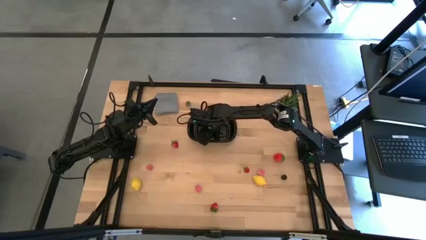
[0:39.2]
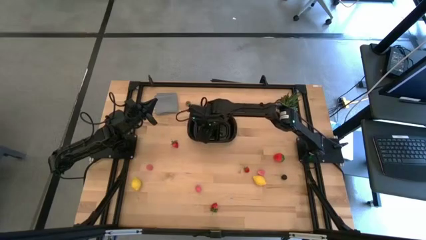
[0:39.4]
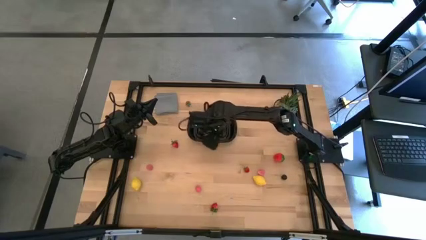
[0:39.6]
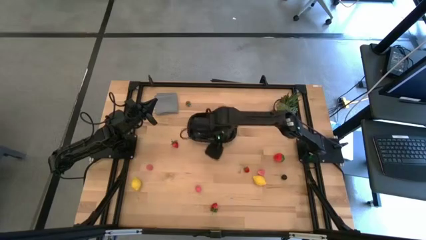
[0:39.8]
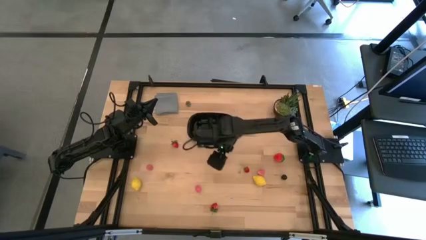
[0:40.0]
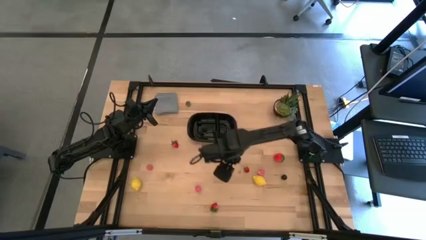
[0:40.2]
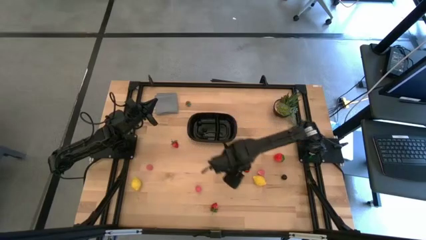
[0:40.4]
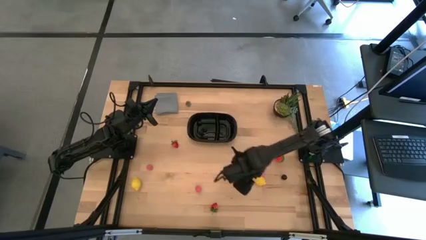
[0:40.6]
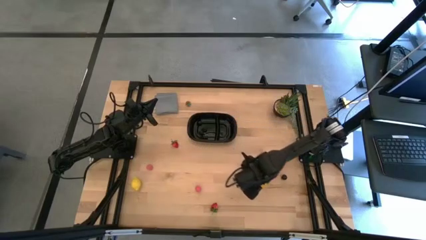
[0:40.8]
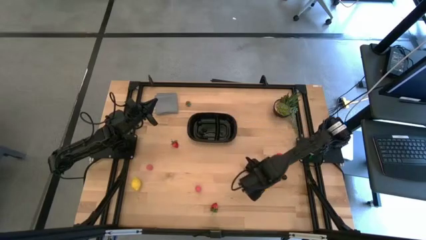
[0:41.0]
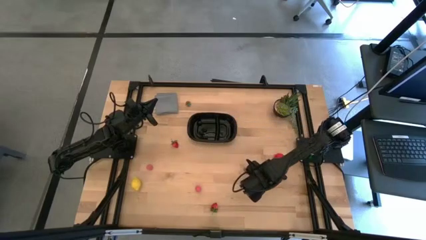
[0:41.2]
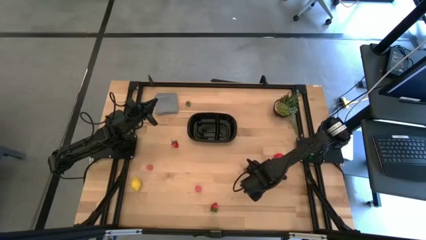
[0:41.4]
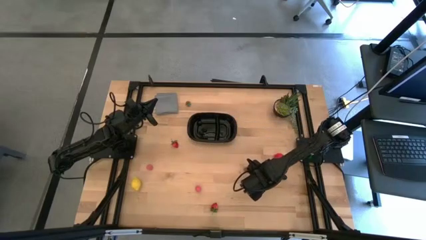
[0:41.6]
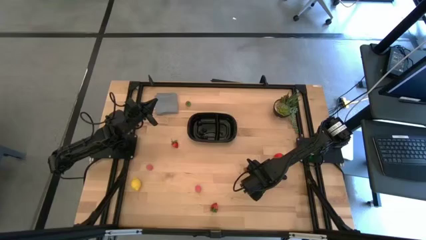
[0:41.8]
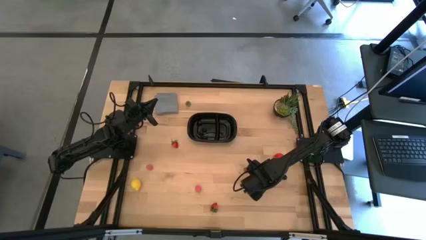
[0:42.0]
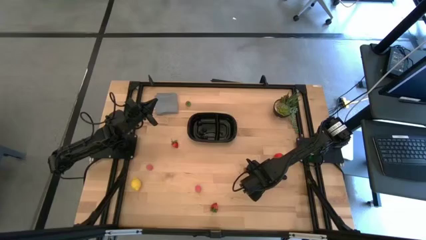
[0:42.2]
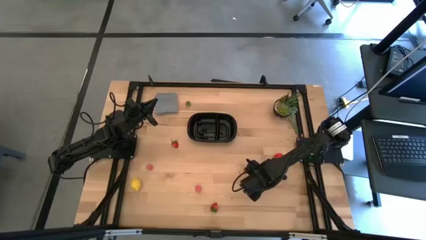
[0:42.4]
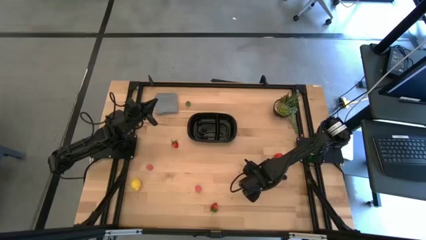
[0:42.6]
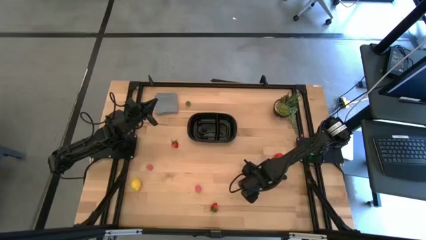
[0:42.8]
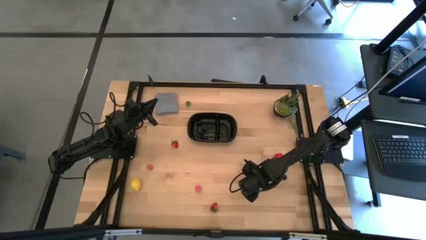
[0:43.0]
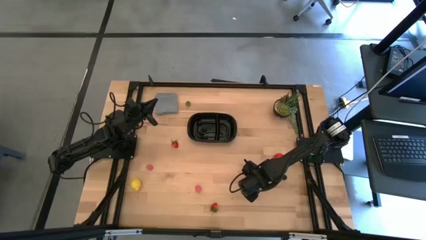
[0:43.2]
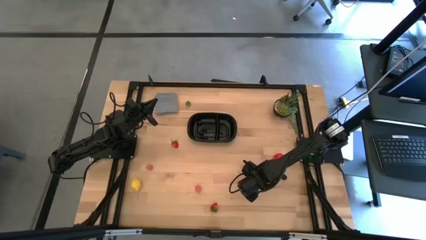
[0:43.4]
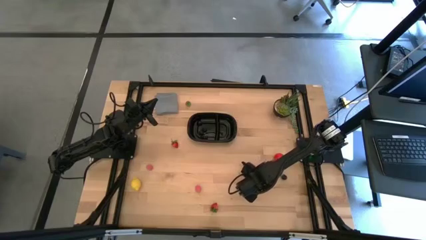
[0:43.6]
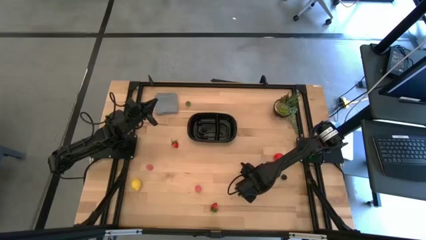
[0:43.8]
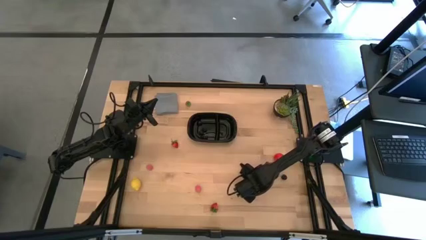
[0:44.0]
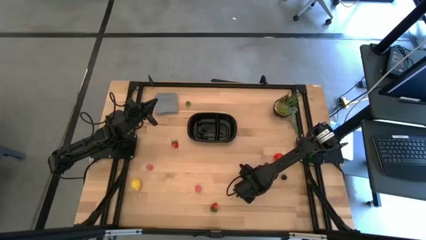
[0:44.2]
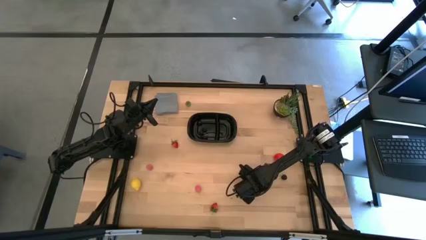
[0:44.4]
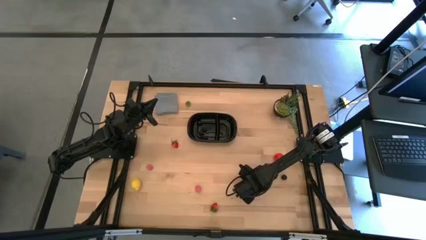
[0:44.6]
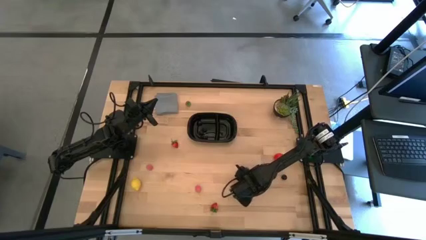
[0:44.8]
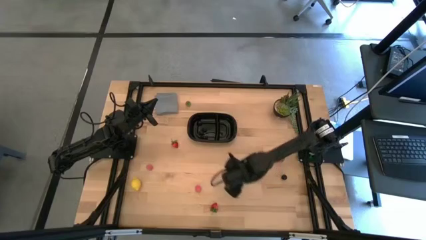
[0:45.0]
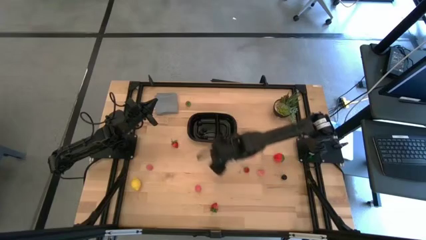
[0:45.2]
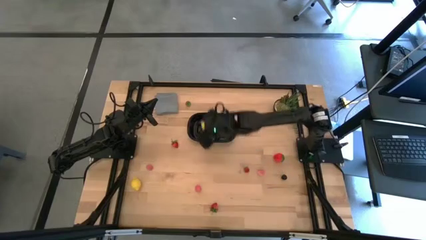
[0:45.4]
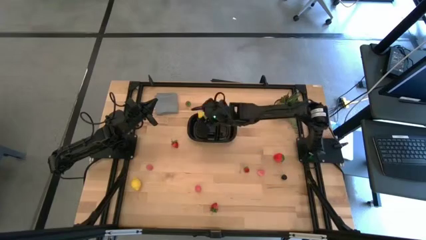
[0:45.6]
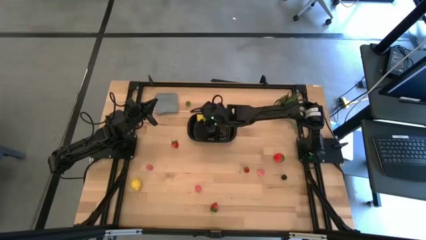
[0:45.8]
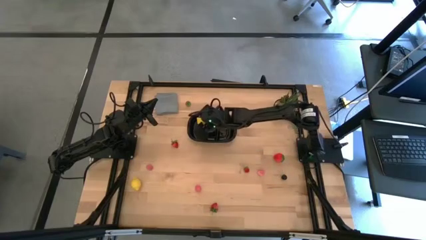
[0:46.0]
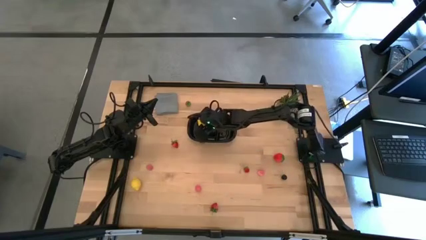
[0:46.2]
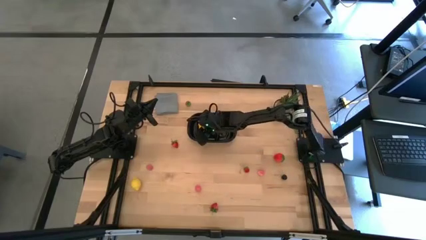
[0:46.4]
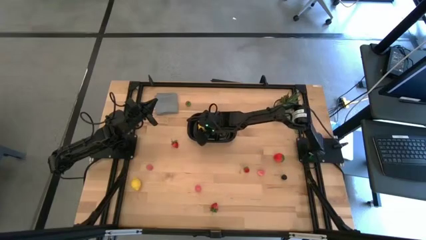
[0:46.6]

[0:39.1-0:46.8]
Task: Pick and placing Produce into tupperware
Put the right yellow lemon into the black container

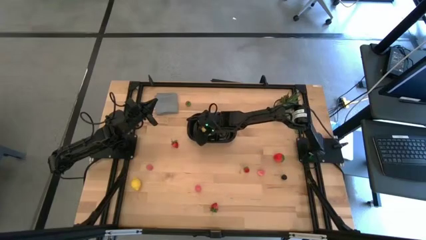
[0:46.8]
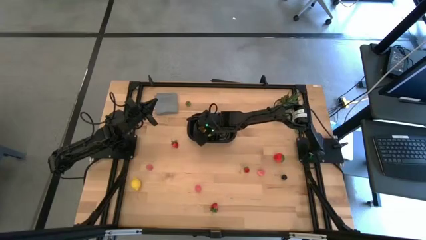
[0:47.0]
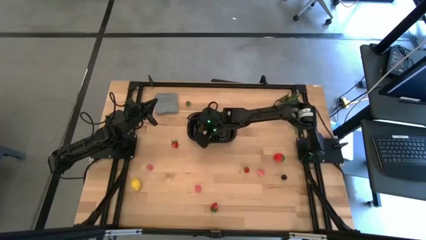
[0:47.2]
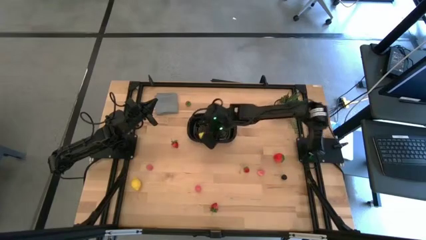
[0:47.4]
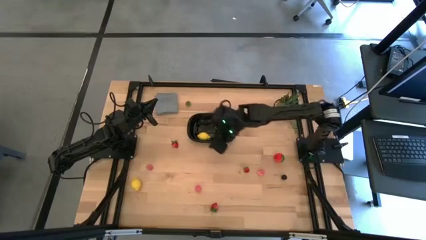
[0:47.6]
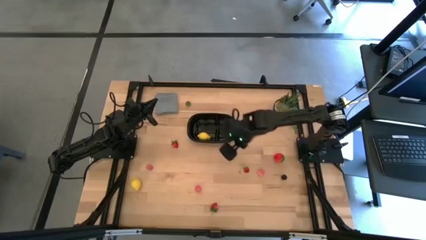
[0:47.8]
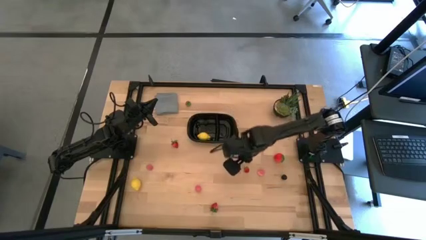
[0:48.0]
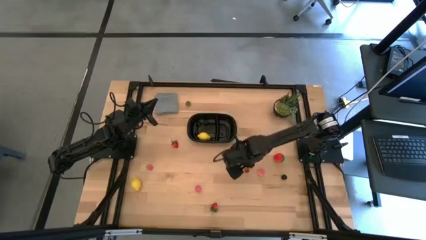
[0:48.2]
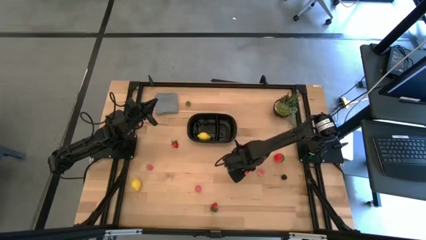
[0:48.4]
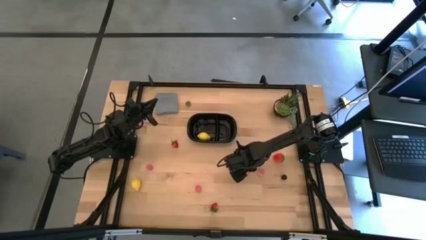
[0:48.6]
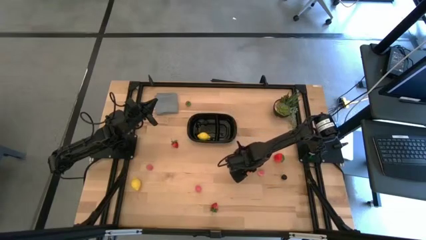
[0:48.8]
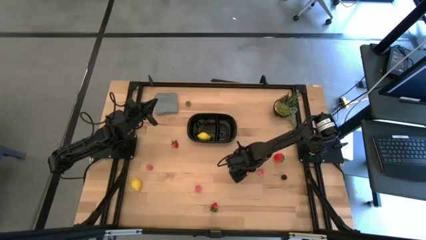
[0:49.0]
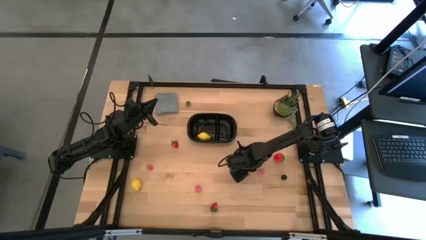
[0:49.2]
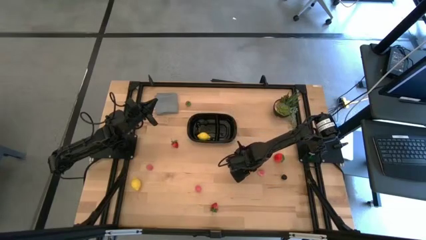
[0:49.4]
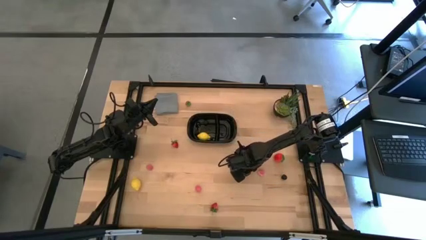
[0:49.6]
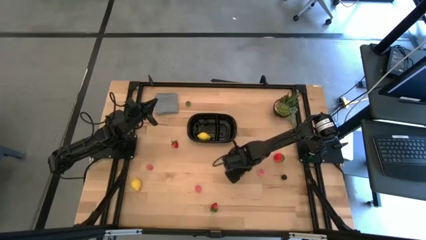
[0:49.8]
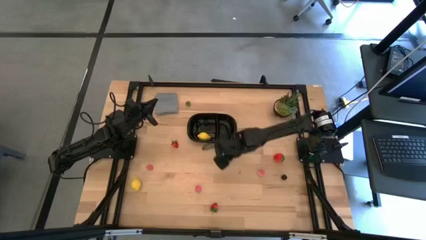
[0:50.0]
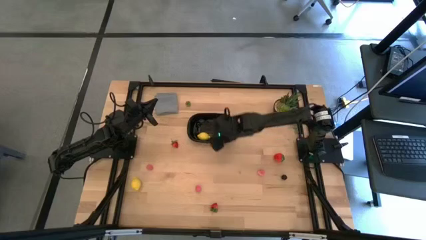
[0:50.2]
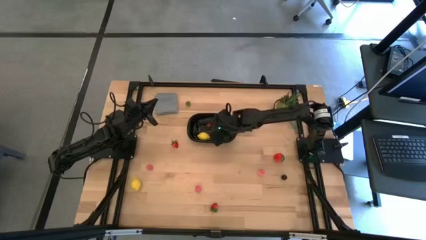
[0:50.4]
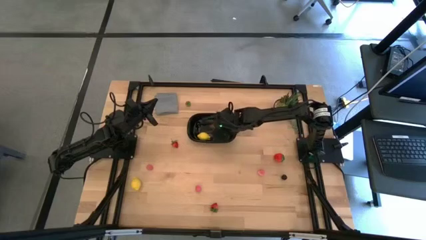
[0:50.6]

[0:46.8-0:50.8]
Put the right red strawberry into the black container

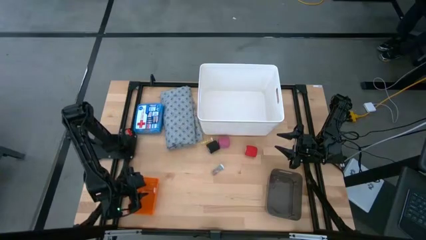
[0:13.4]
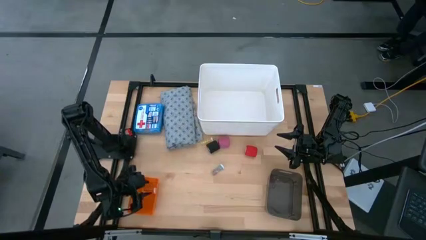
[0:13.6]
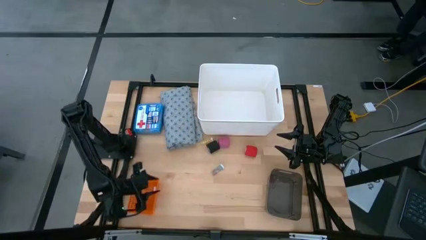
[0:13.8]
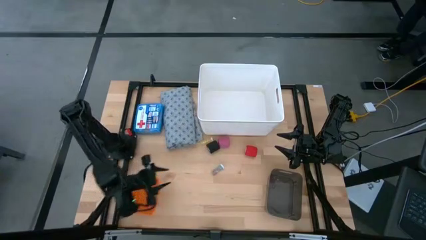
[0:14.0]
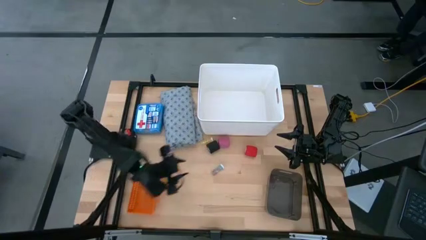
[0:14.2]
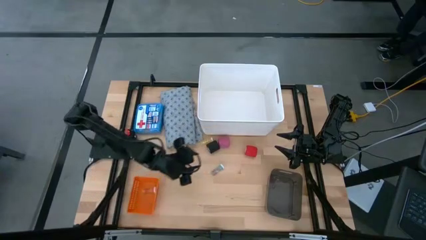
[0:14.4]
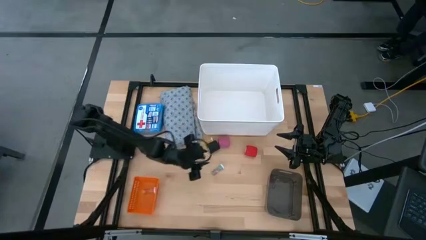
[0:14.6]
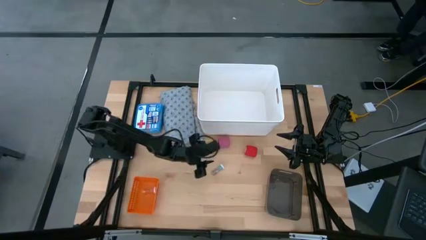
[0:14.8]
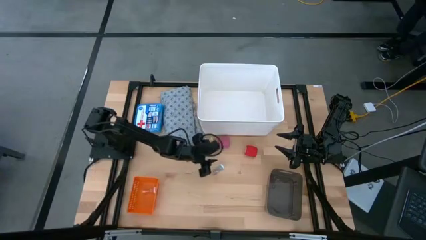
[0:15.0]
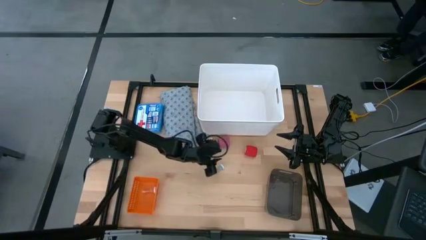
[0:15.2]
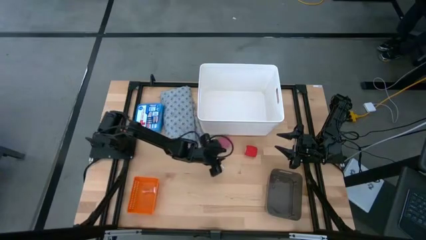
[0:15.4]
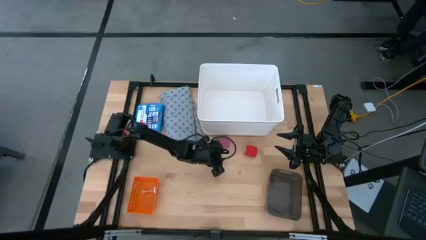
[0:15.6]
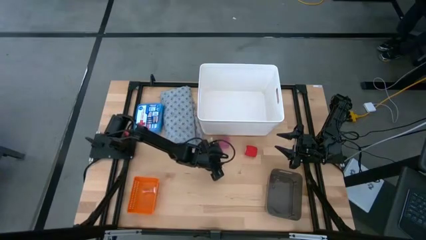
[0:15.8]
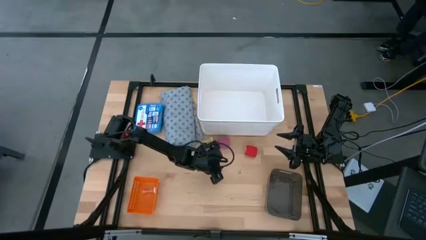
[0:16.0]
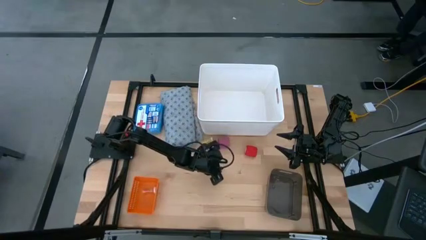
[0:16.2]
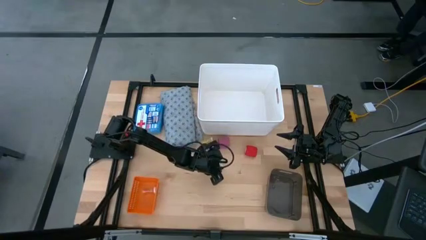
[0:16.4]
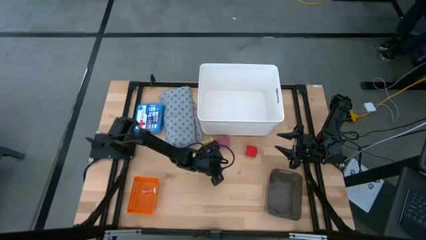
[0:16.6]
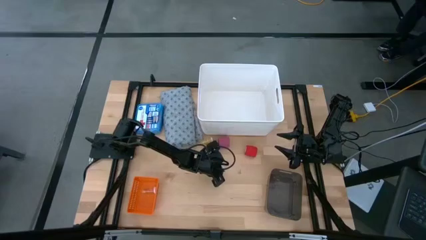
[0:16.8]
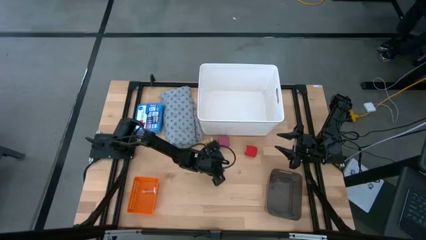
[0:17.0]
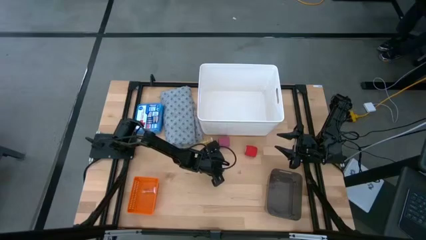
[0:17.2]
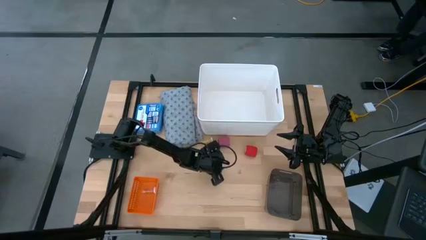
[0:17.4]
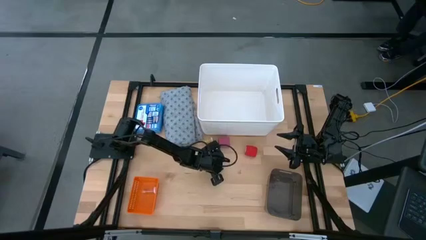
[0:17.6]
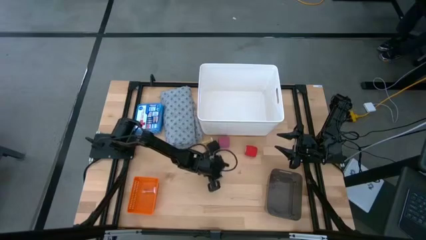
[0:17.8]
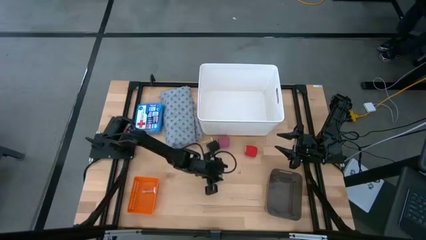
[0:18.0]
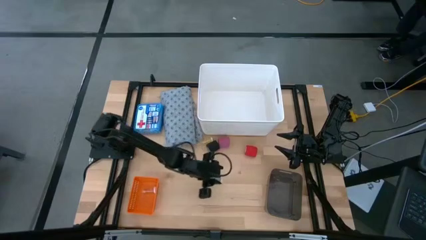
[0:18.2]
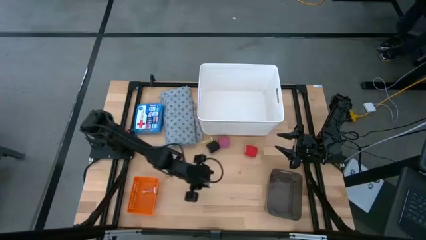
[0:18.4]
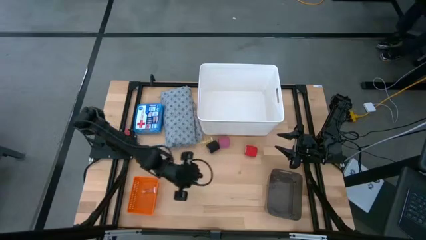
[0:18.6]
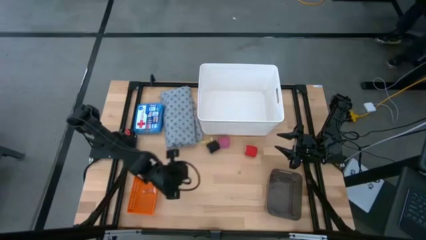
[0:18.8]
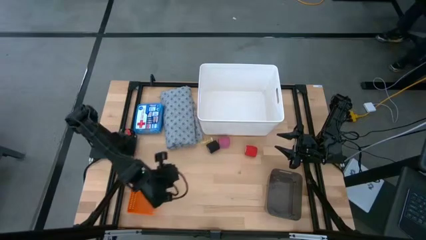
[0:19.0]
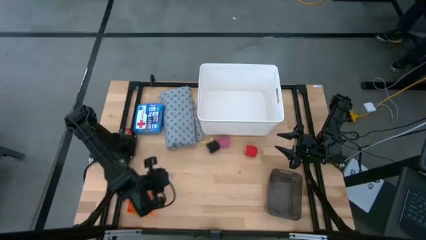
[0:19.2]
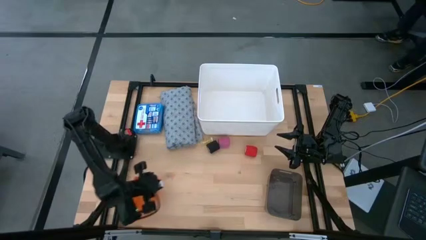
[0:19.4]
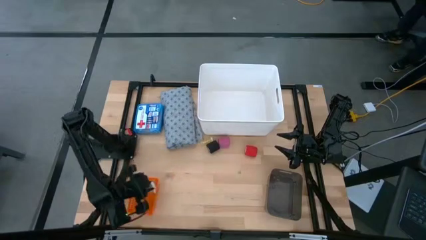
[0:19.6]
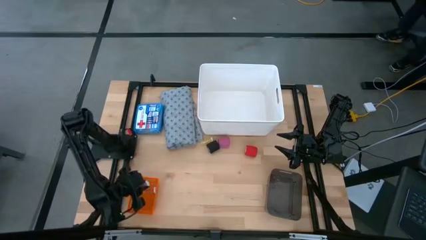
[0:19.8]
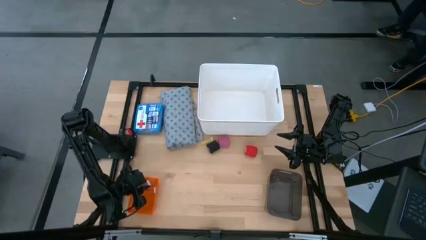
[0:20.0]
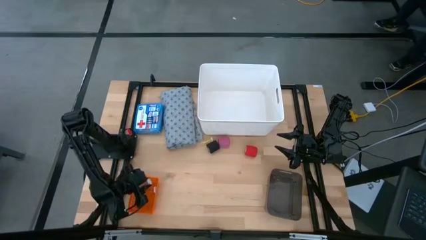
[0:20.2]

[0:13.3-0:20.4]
Task: Pick & Place Medicine items
Put the green pill bottle into the orange bin
